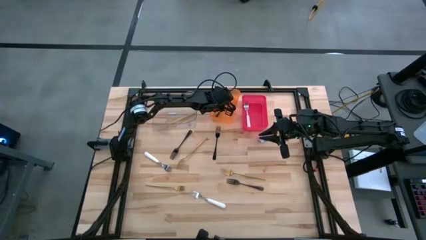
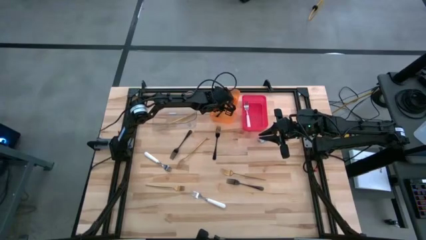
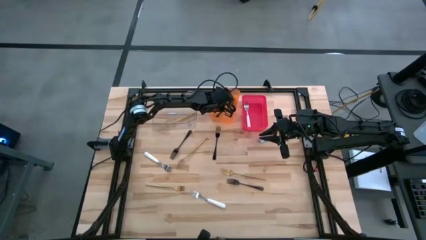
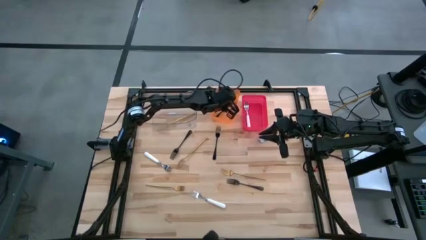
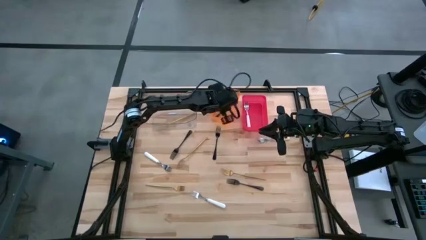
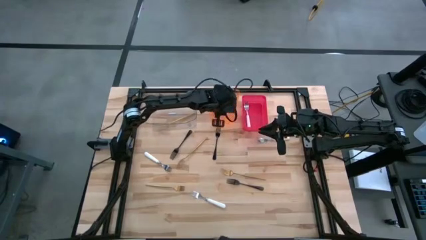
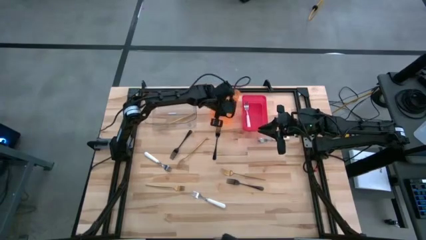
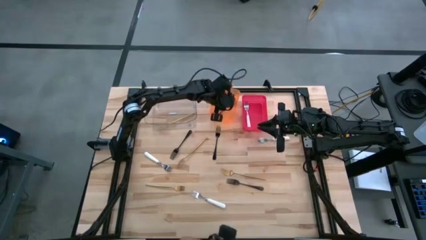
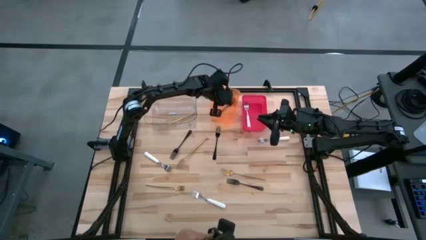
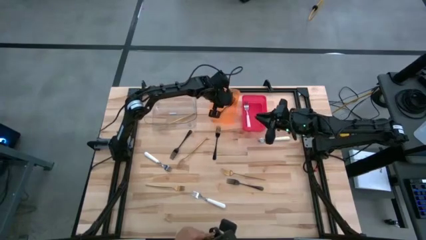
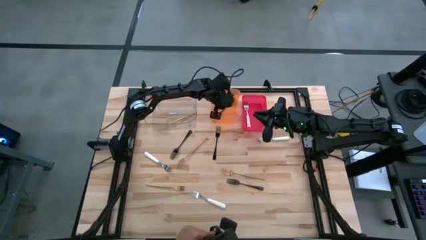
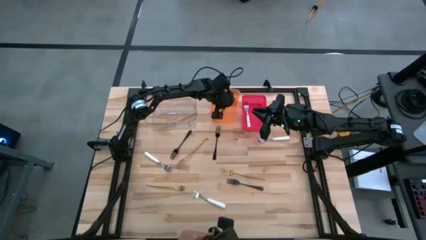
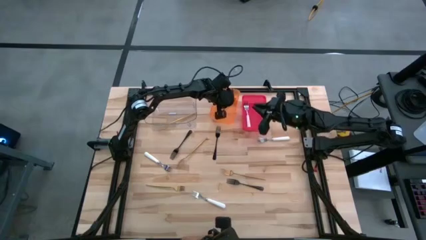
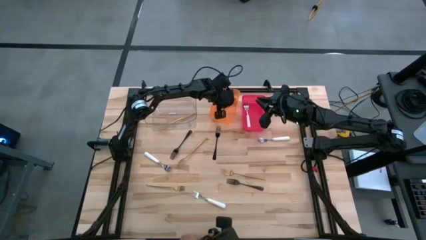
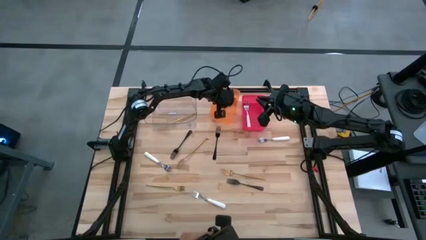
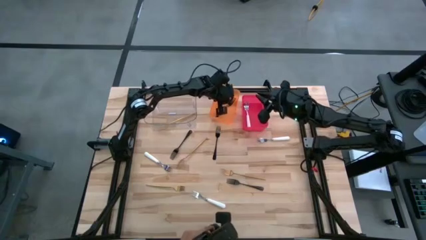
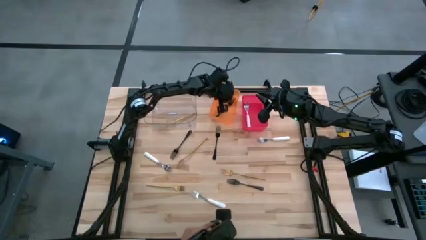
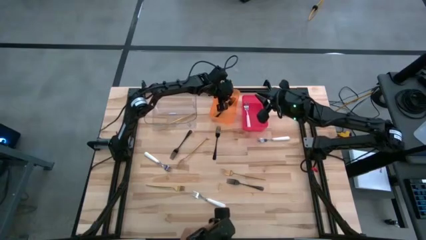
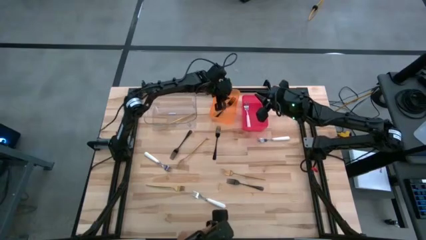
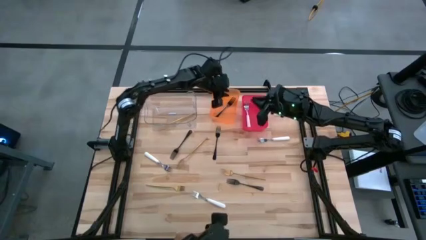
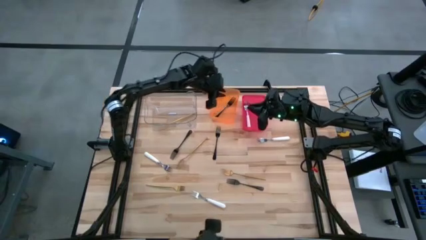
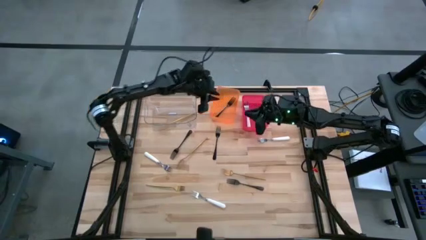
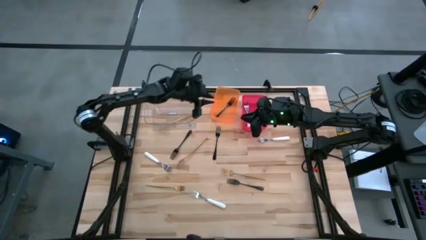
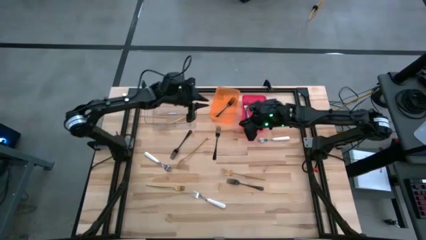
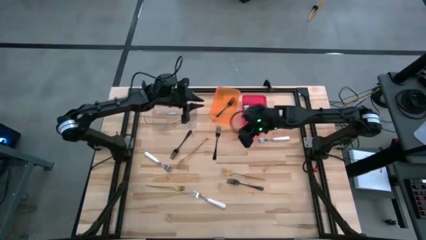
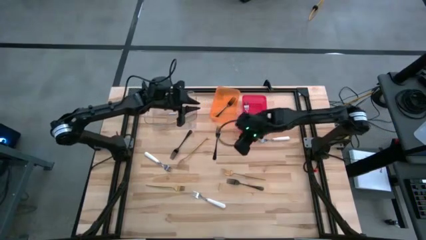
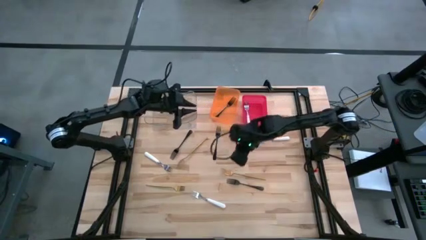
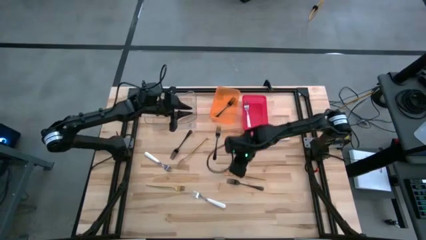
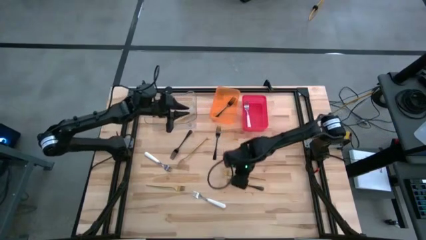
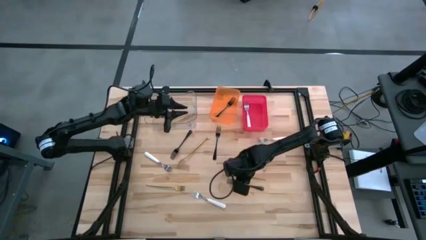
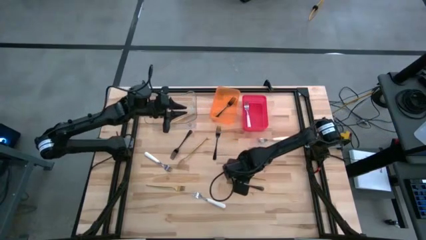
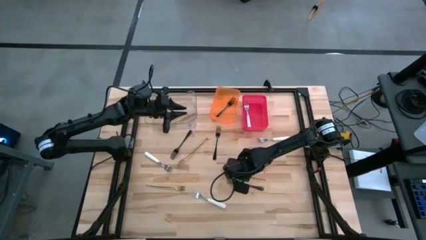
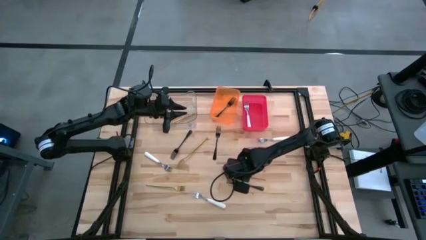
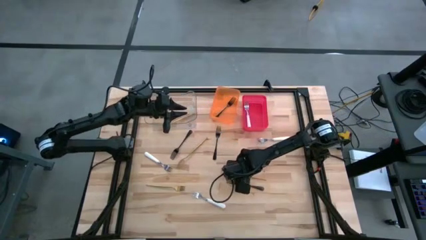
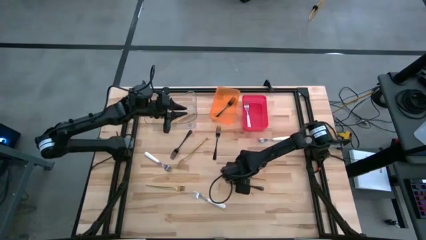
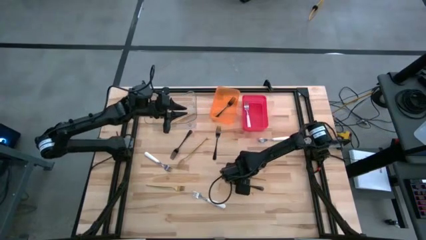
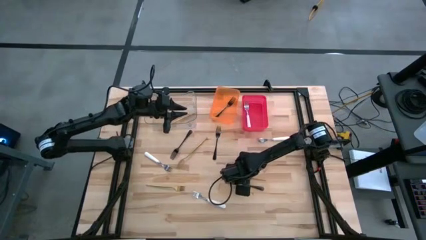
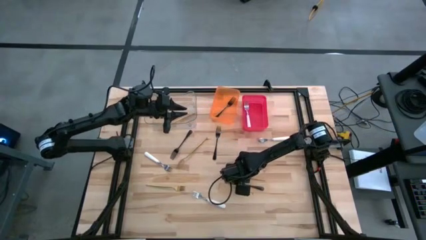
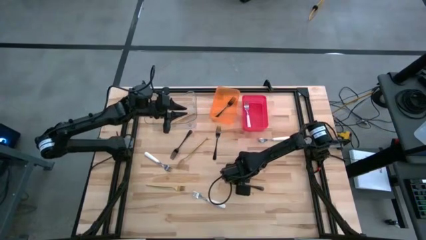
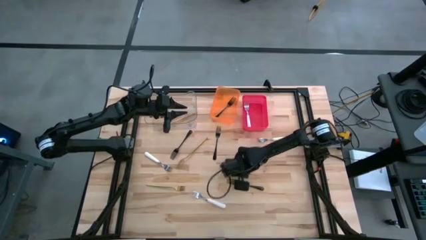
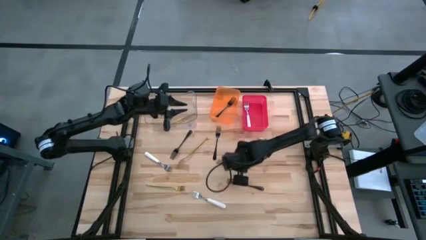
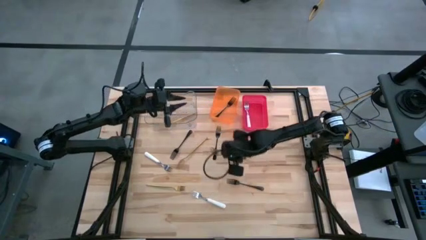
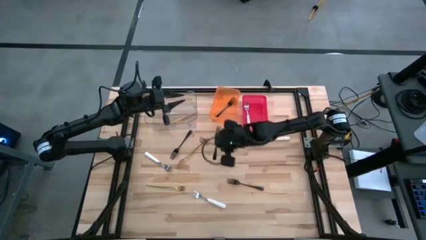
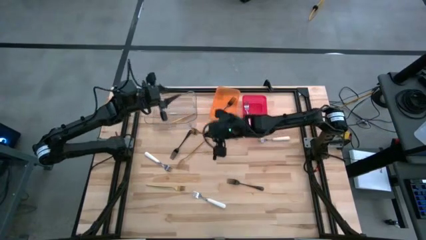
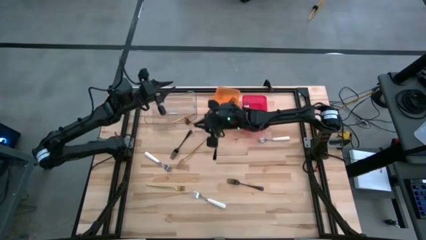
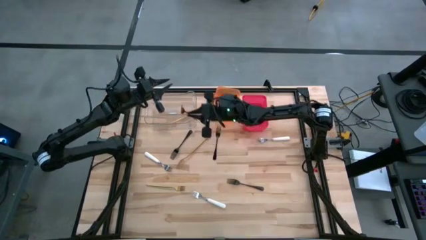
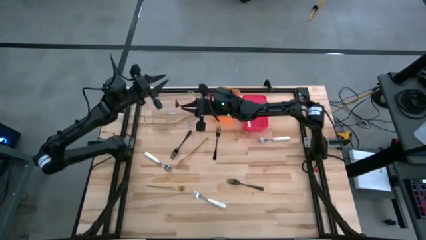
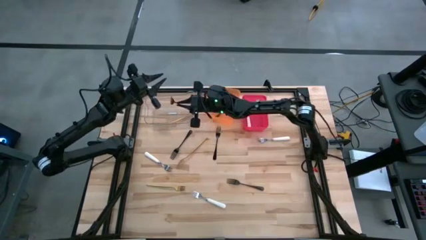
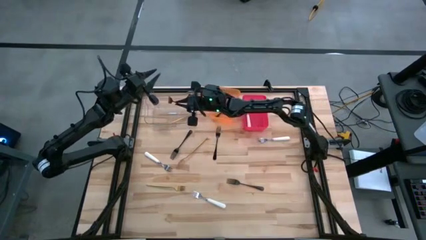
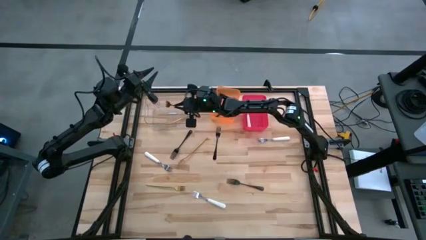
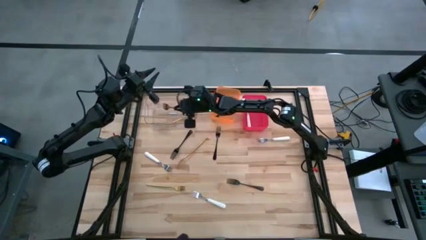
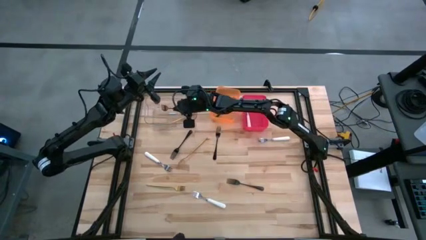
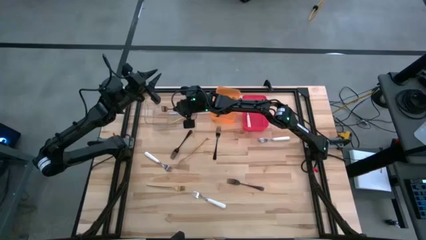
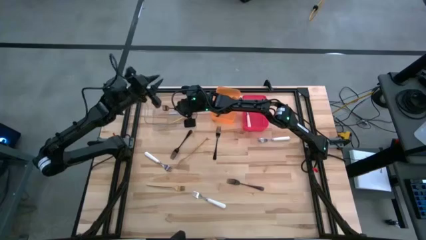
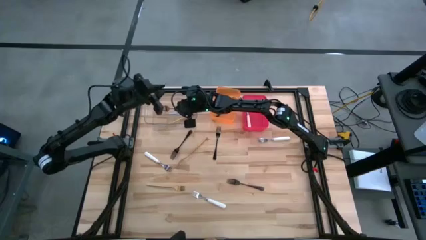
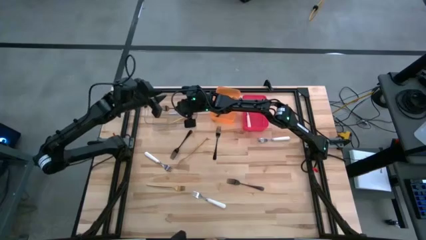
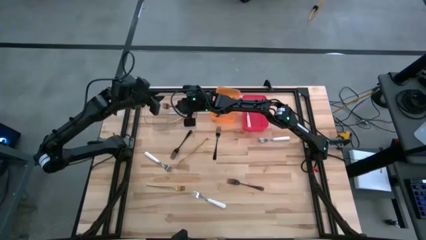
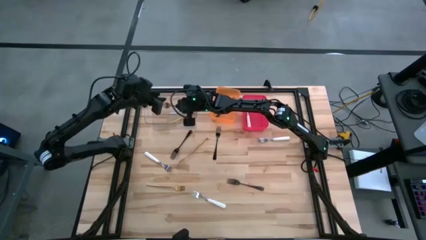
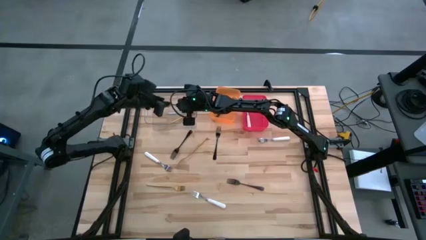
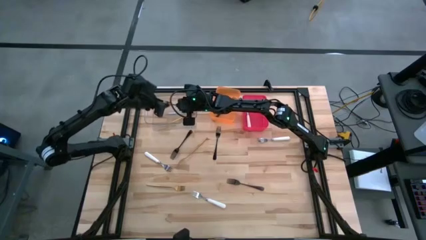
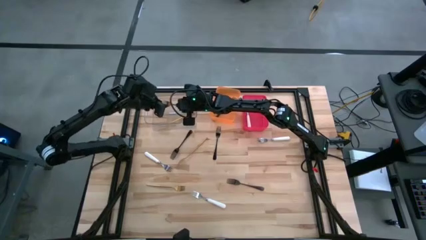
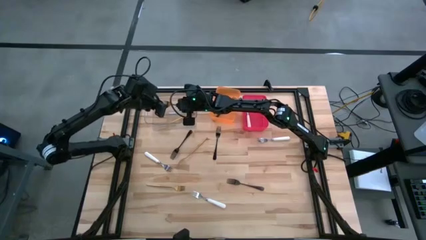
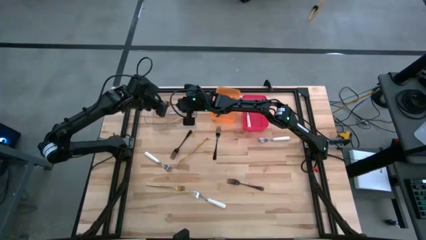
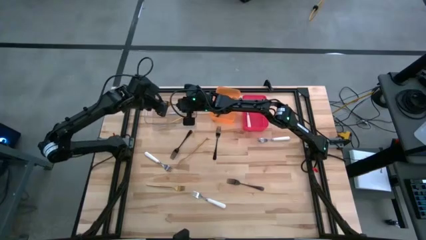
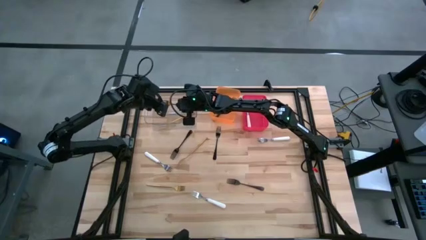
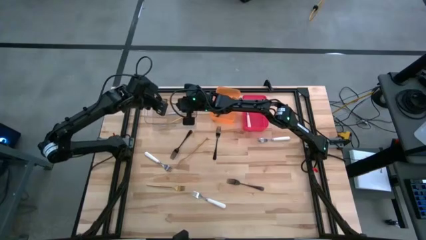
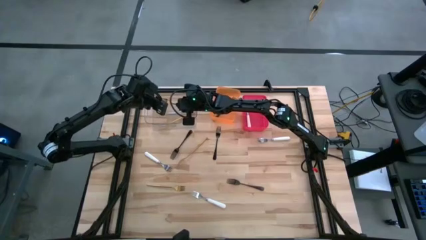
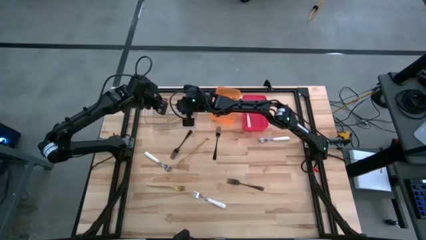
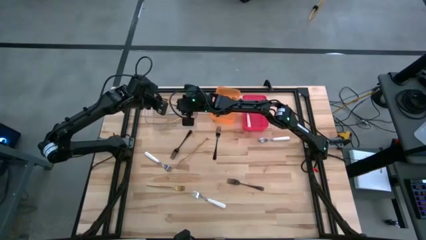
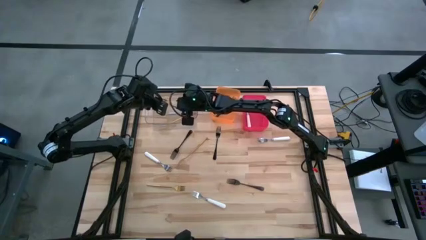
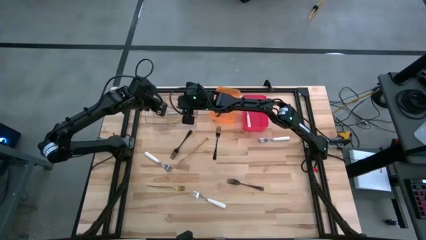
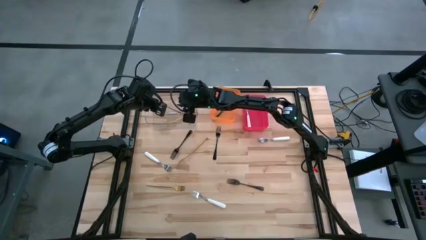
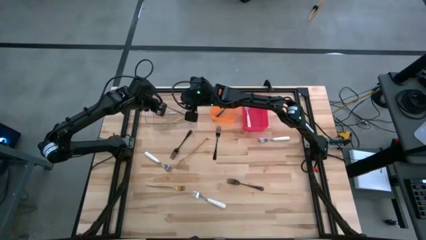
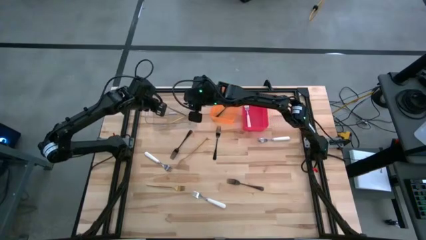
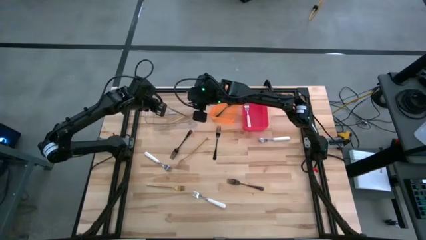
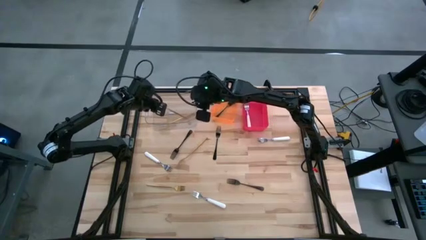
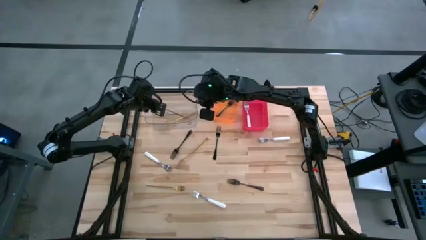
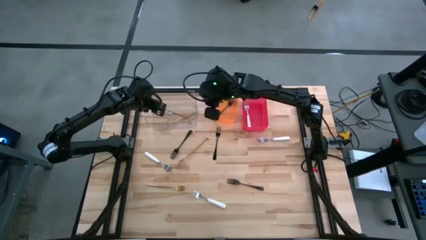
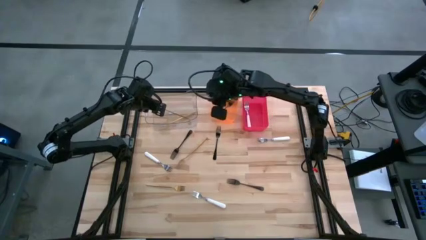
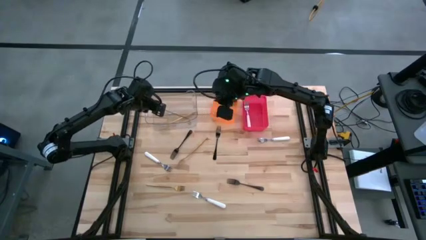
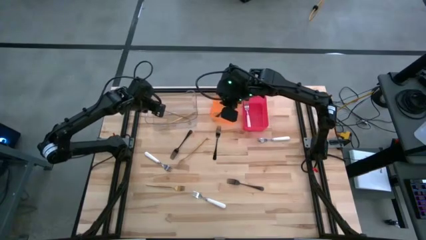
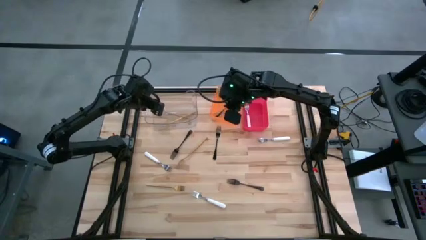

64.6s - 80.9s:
Task: Sort silverware by color (type)
Put the gold fork into the transparent bin
